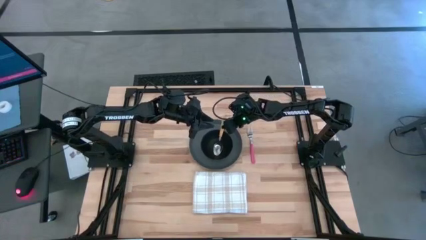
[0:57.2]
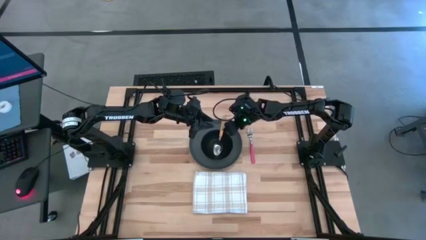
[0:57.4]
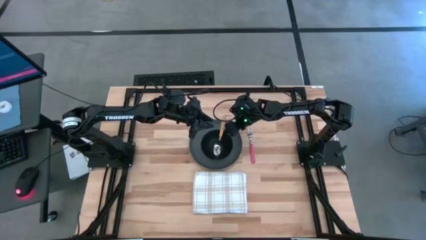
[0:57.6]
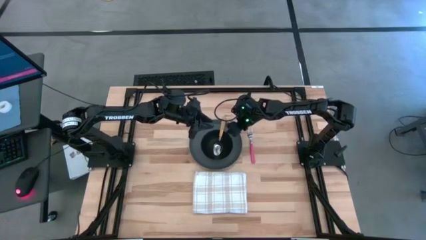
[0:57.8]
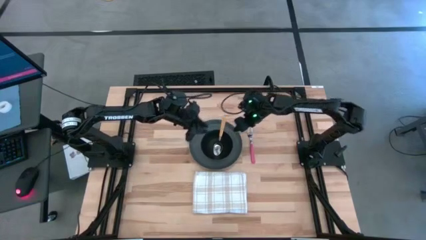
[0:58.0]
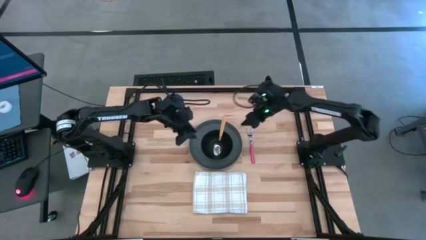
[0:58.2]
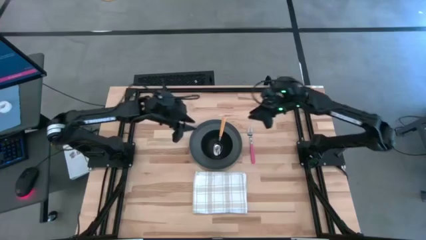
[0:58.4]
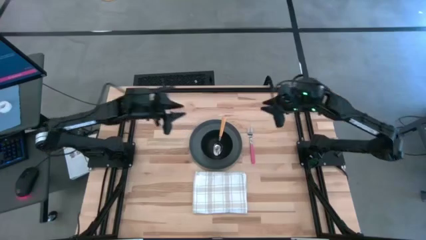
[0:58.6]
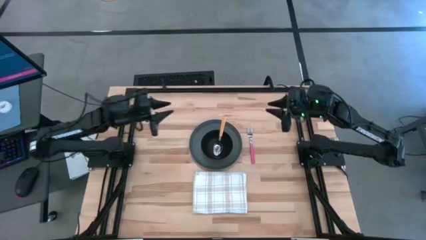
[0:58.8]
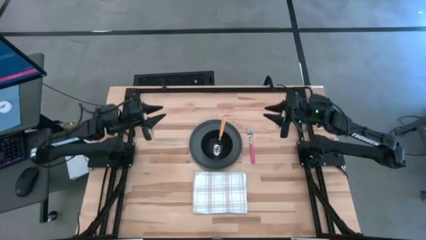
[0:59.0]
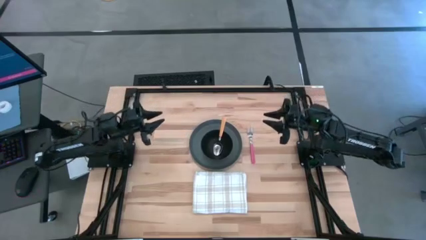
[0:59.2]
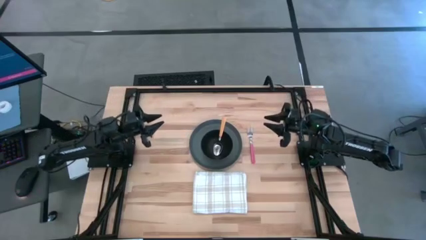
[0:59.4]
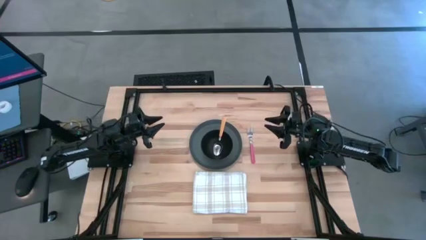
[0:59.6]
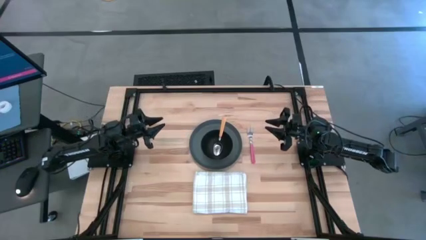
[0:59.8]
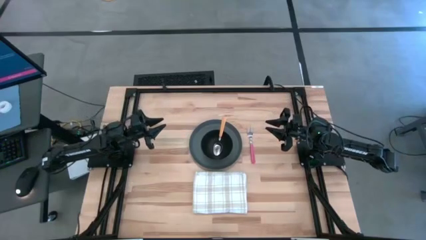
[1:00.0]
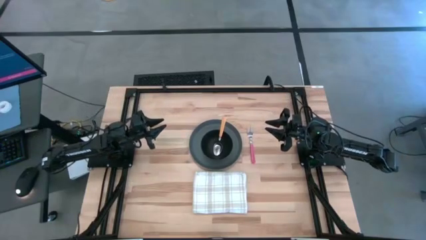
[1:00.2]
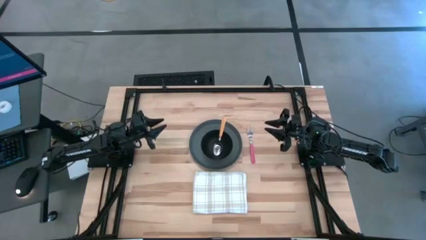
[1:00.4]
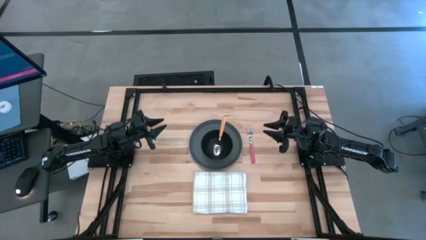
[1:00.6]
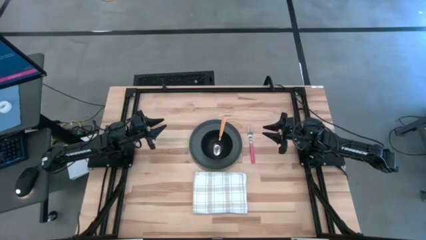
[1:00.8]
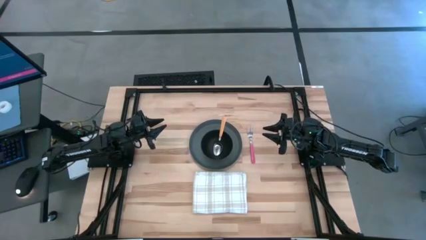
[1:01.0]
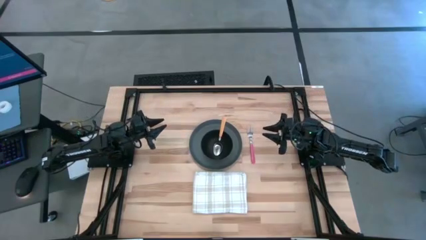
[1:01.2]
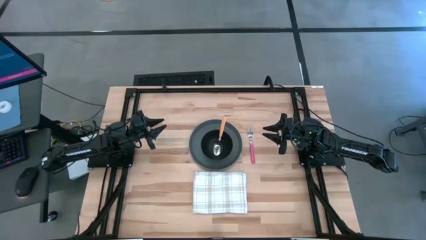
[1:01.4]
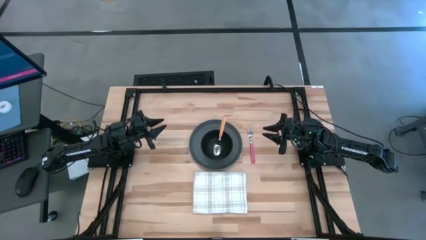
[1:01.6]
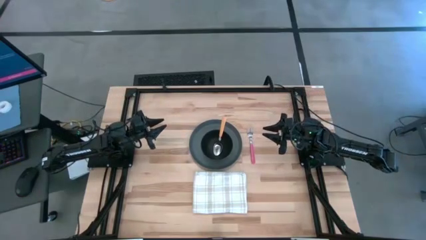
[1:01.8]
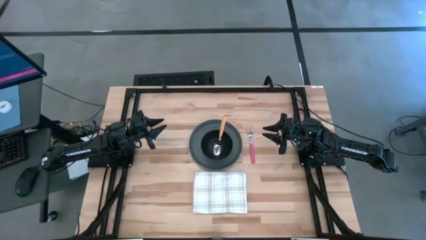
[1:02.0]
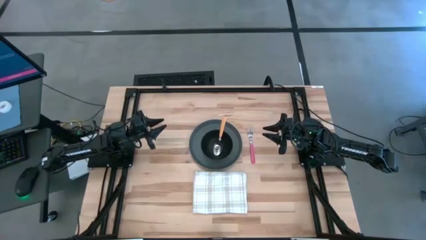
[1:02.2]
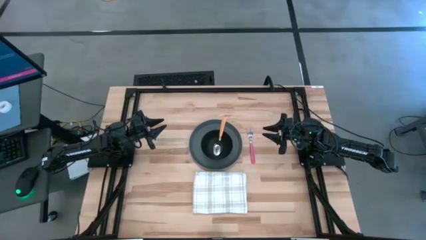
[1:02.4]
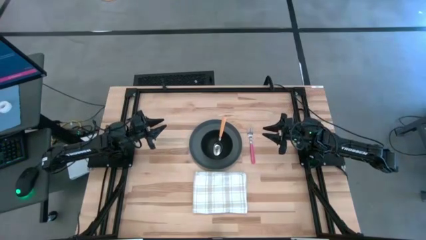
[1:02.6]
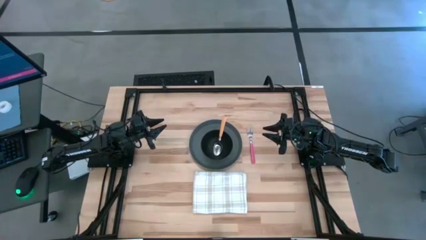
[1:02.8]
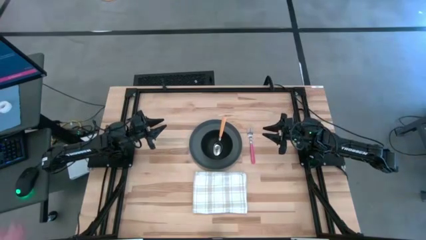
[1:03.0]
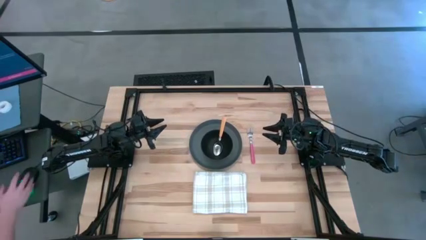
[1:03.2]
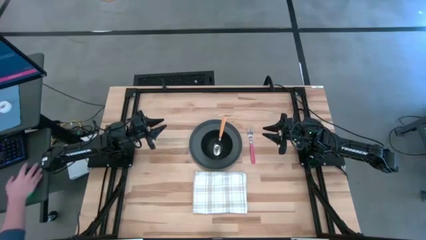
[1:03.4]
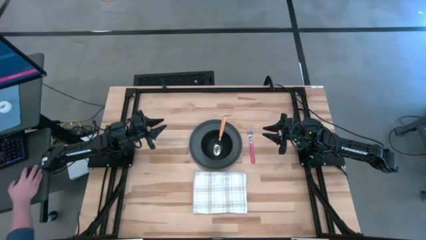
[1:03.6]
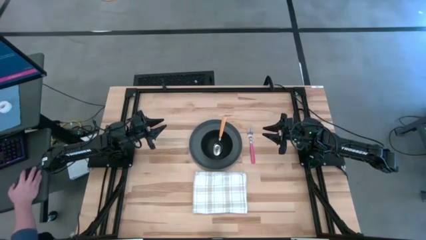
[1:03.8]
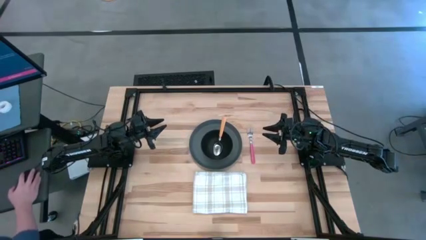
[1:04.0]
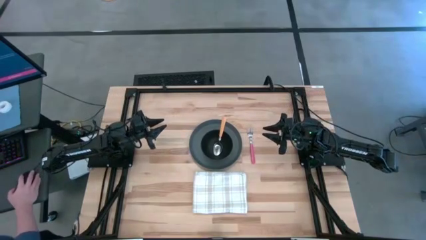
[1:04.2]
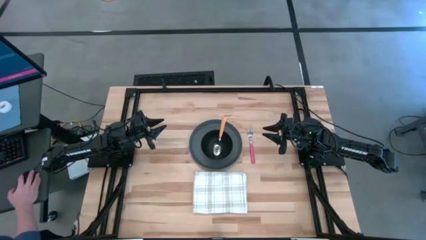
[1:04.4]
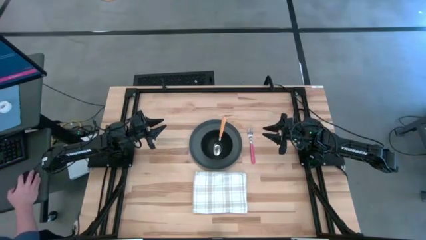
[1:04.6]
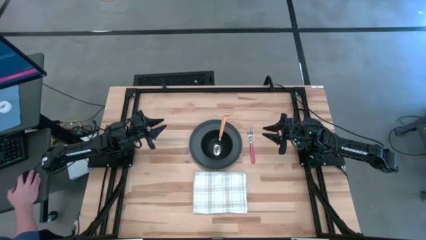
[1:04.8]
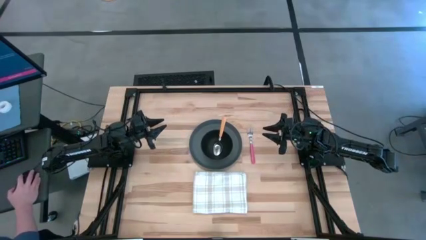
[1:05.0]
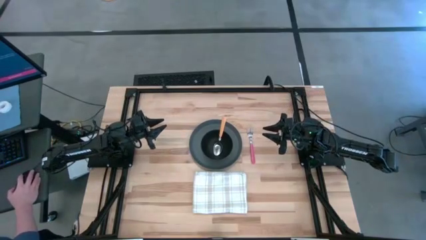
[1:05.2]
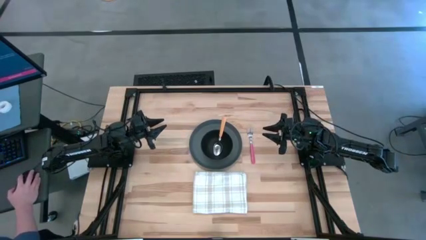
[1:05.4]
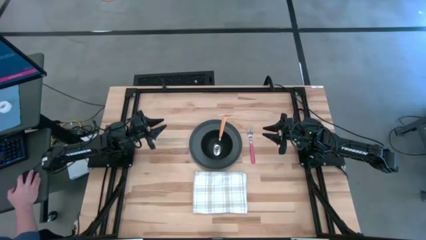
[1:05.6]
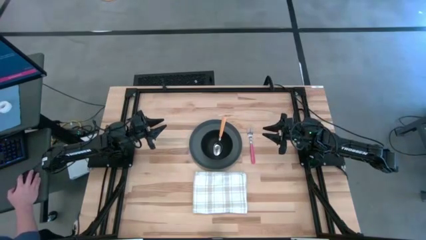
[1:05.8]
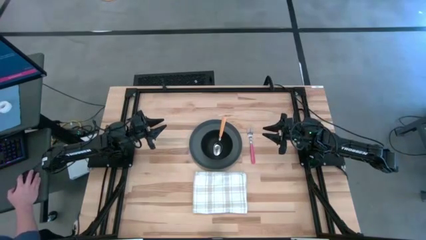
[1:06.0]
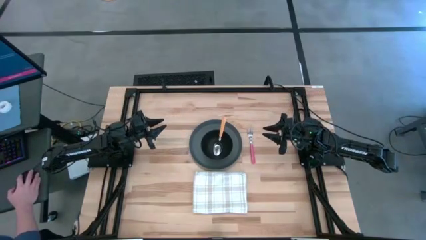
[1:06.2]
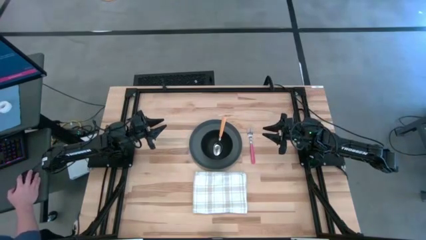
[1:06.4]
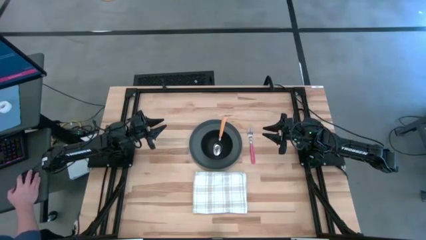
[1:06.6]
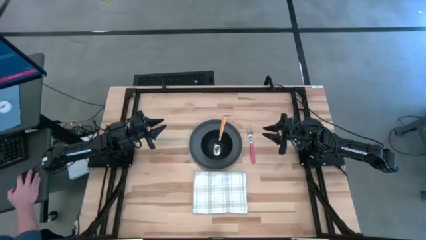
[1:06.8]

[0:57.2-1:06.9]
Task: Set table place
Return to Home Position

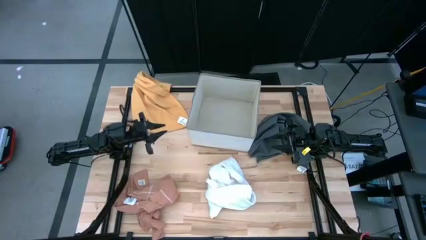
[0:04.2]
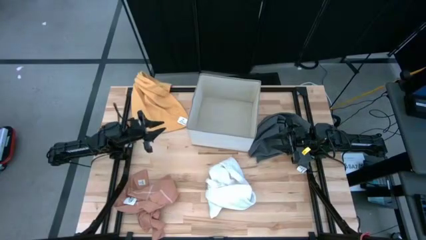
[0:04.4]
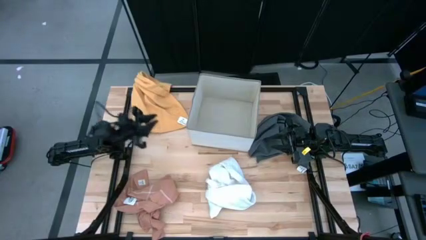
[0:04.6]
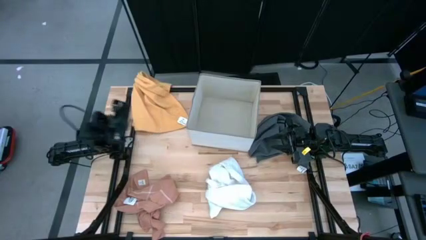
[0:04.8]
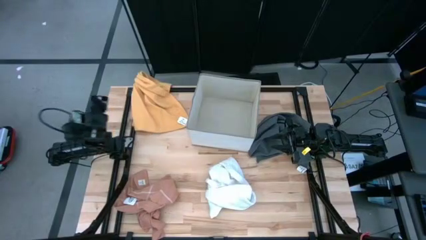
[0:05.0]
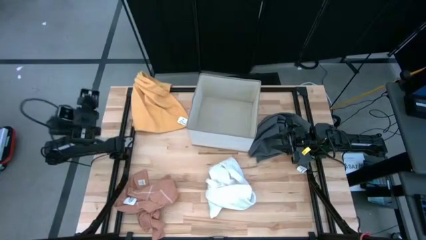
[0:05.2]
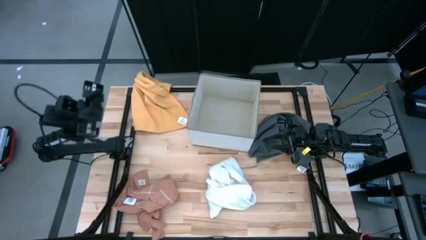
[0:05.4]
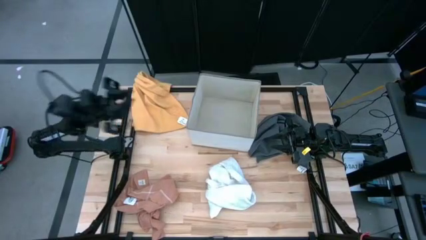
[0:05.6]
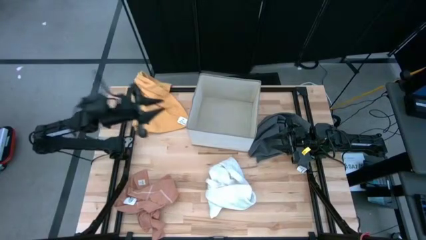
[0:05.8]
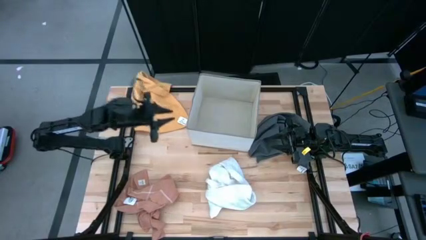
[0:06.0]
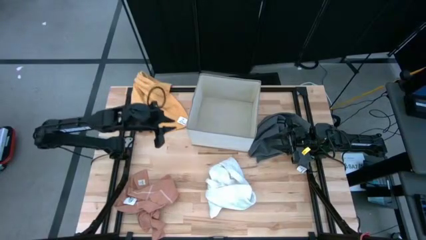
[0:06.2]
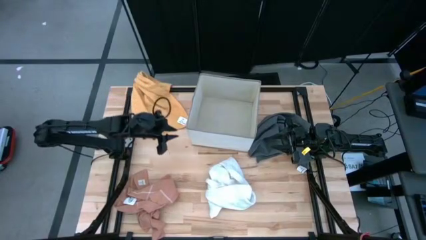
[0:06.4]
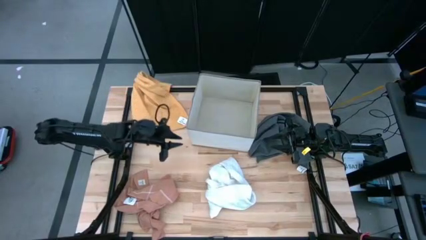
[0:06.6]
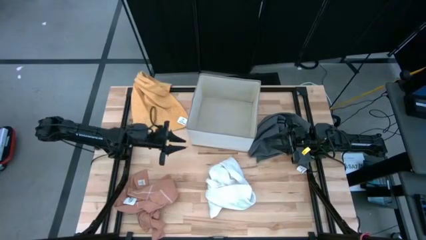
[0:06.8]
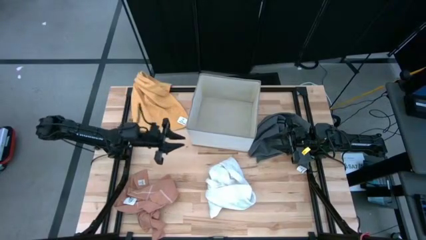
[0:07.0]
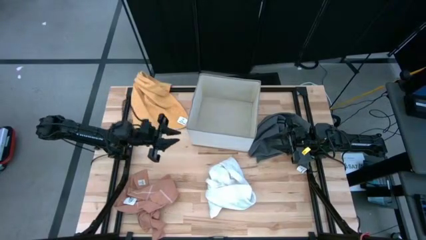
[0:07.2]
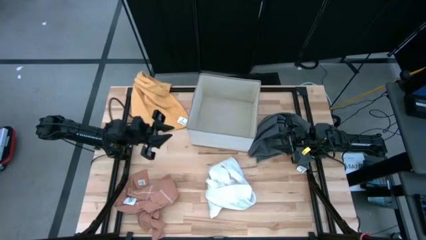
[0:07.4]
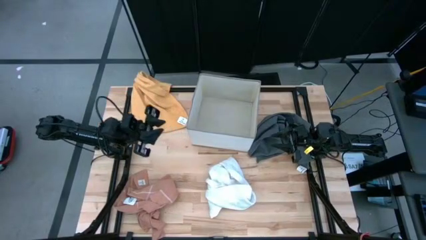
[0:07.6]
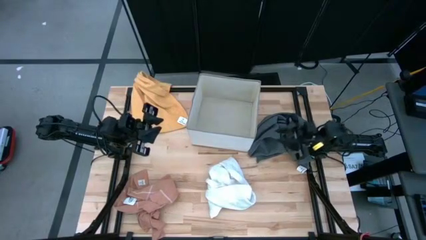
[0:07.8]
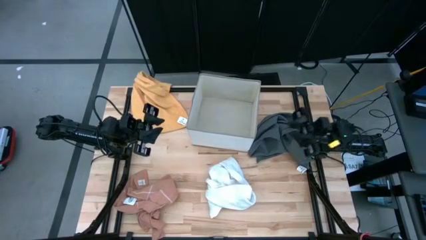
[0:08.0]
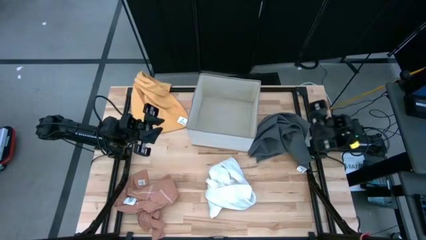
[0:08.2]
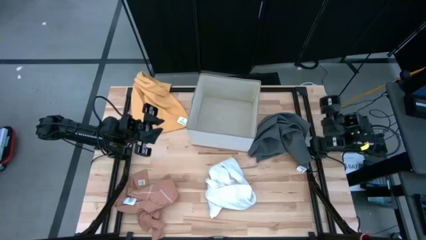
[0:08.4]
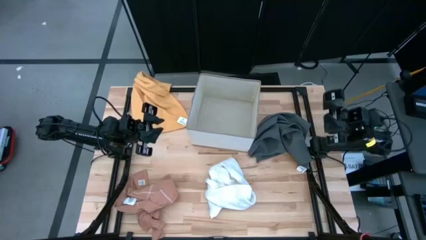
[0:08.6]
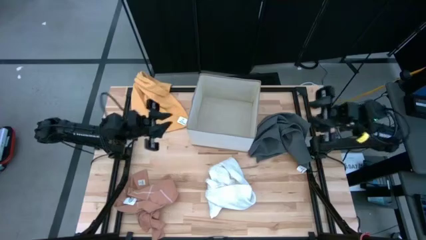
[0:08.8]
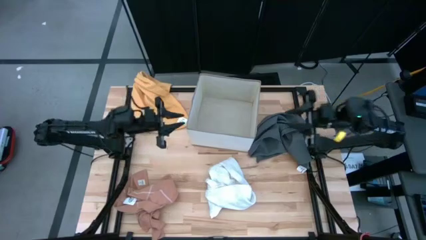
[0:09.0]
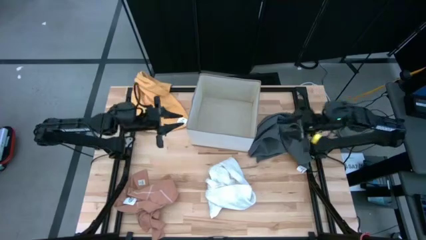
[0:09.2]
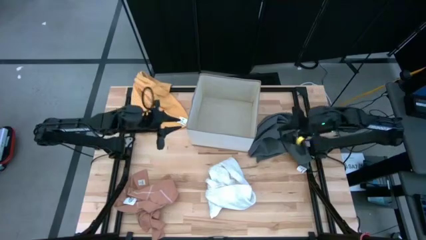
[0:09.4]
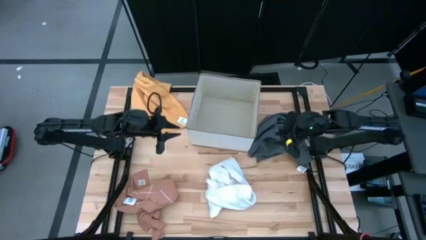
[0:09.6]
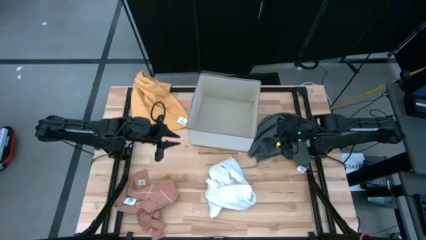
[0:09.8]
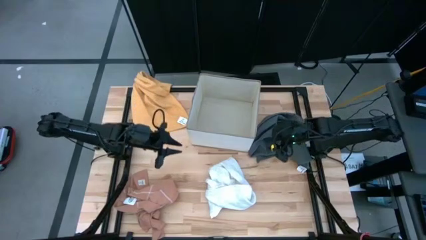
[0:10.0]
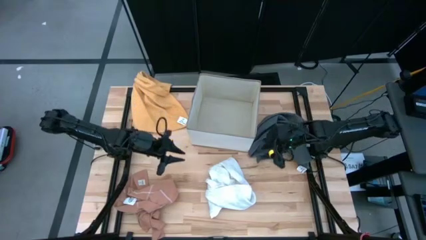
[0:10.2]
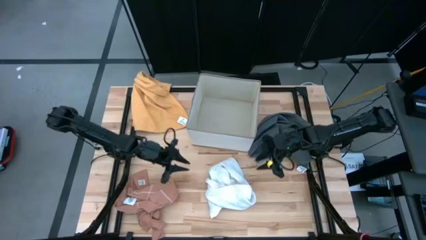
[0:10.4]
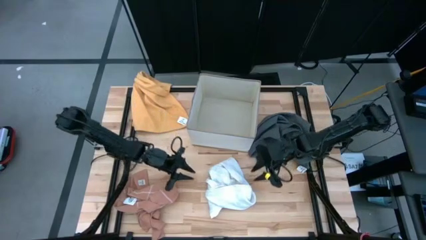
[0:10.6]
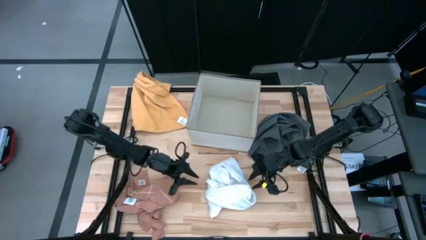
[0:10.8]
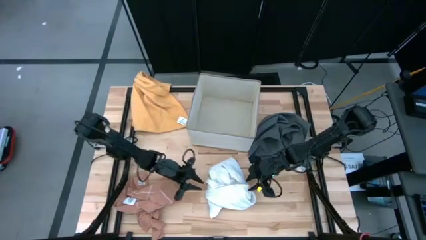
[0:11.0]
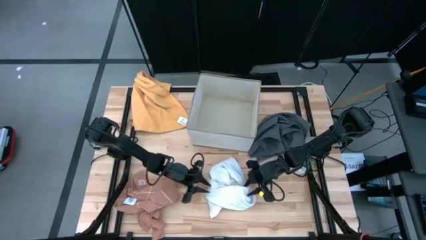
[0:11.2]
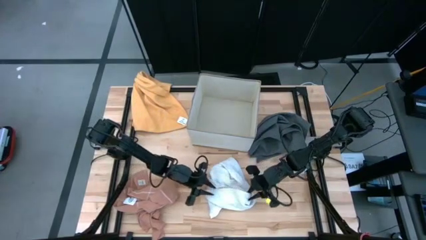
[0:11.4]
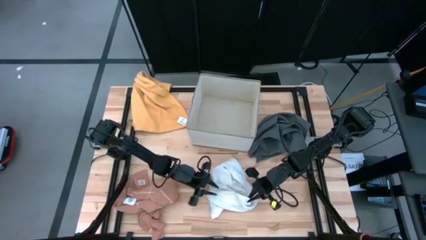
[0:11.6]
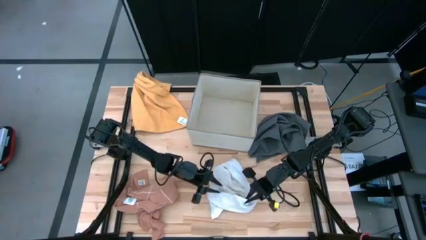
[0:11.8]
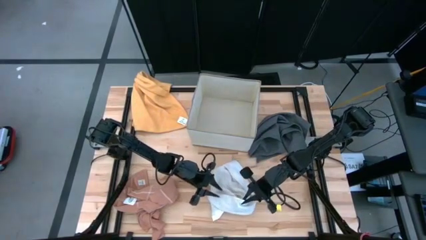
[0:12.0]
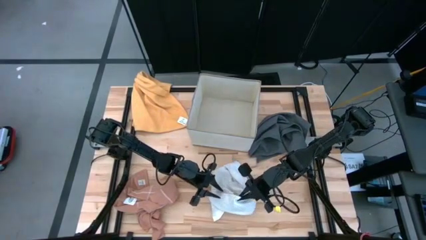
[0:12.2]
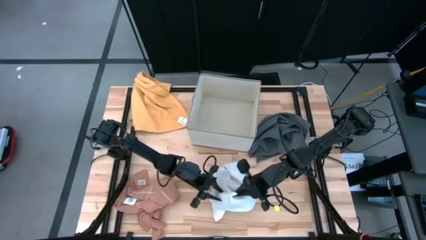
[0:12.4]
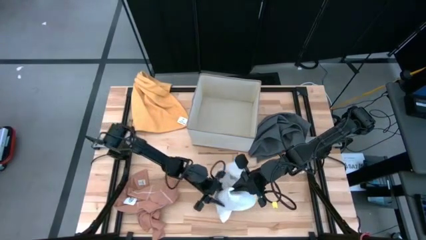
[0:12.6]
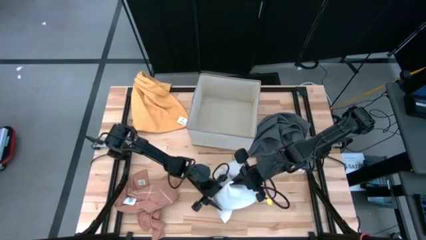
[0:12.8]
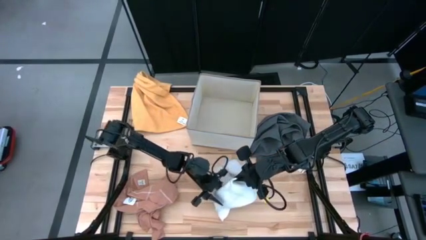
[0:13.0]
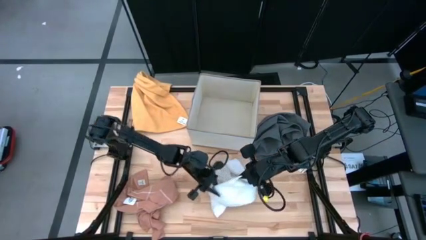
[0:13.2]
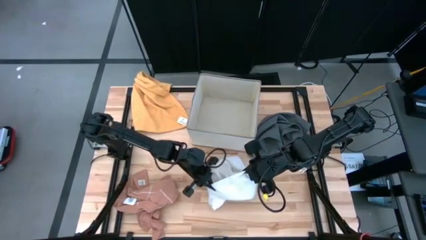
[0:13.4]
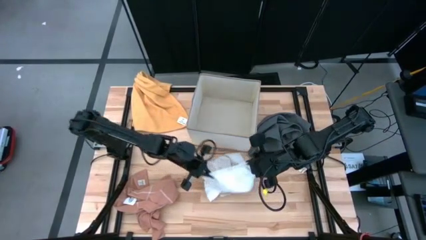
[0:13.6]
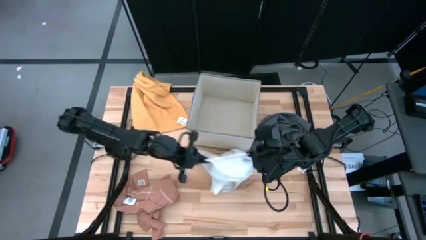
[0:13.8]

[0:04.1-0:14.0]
Task: Fold towel
Fold the white towel
